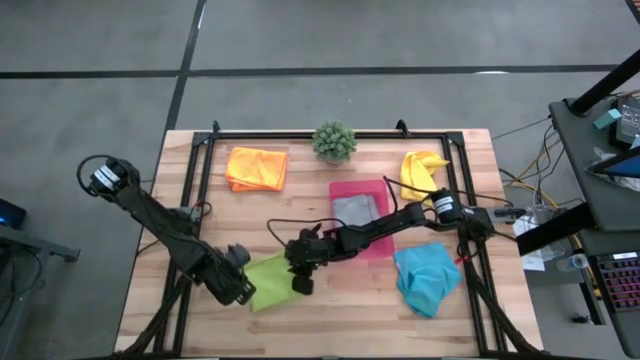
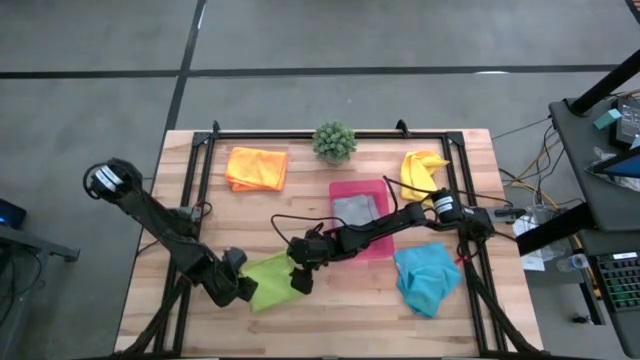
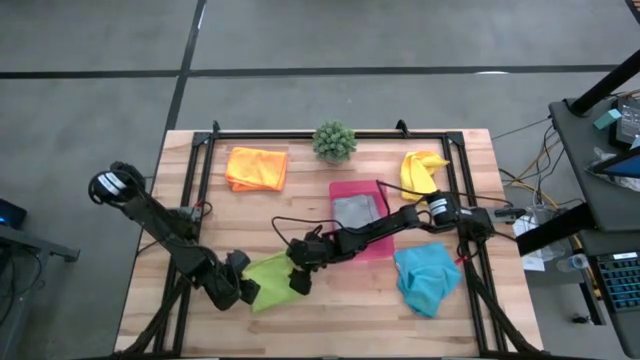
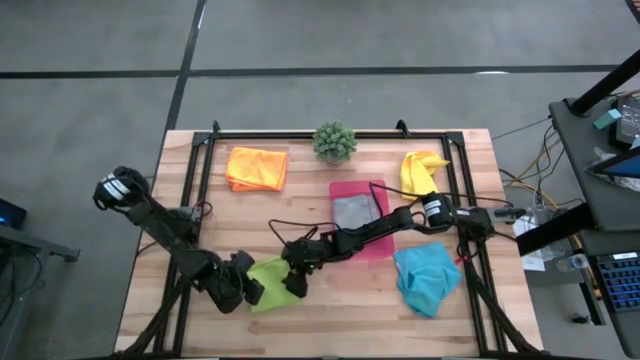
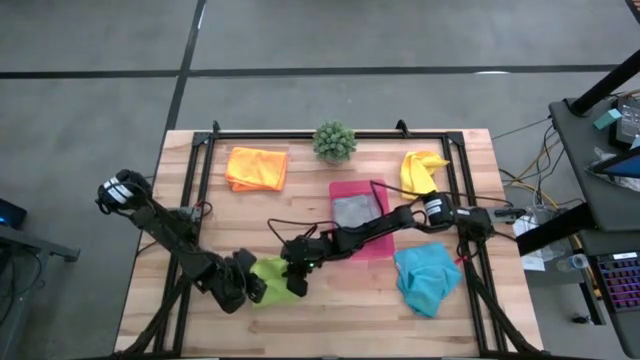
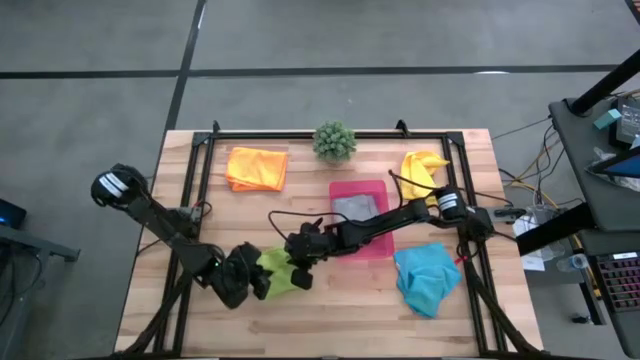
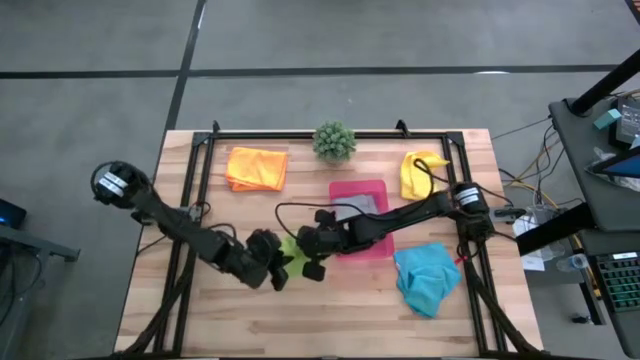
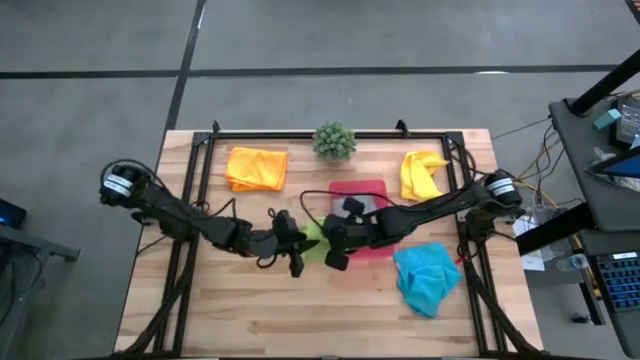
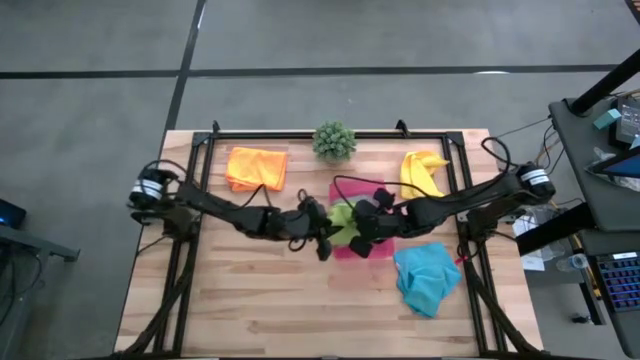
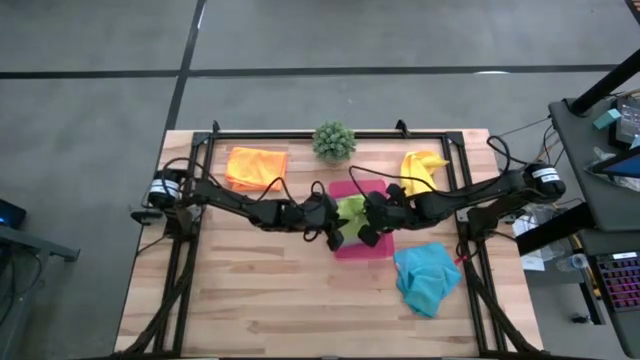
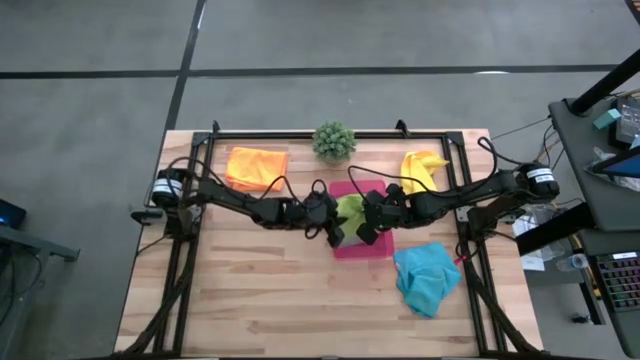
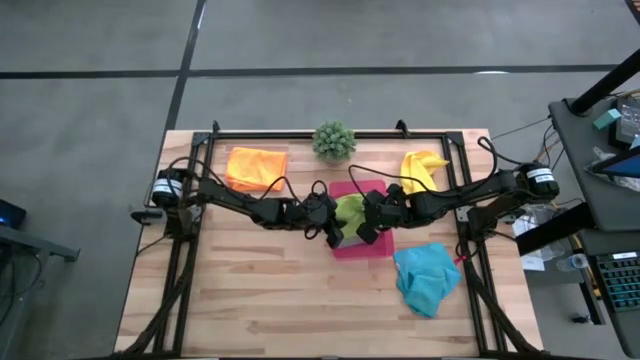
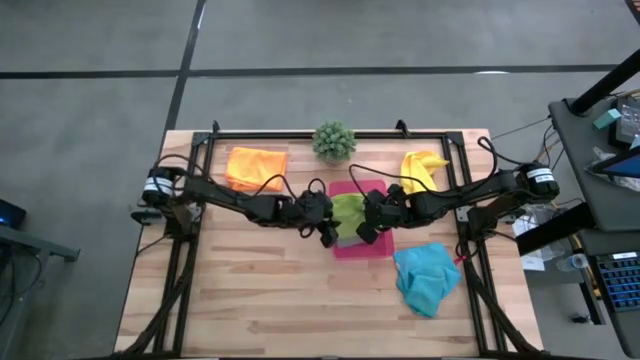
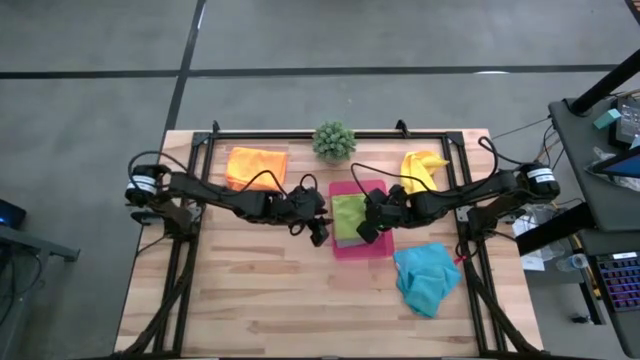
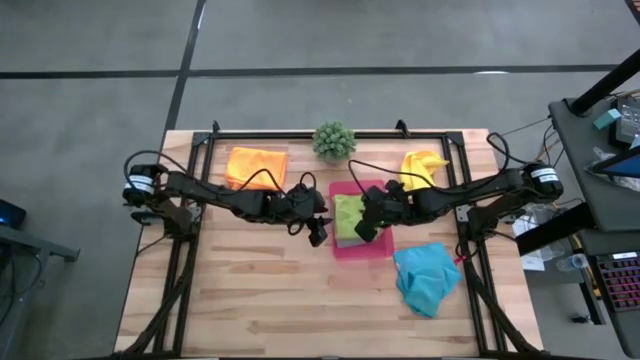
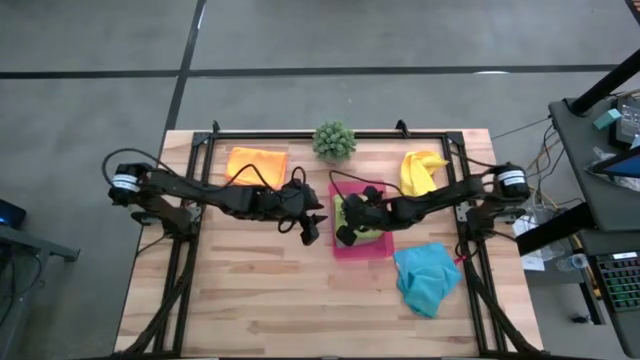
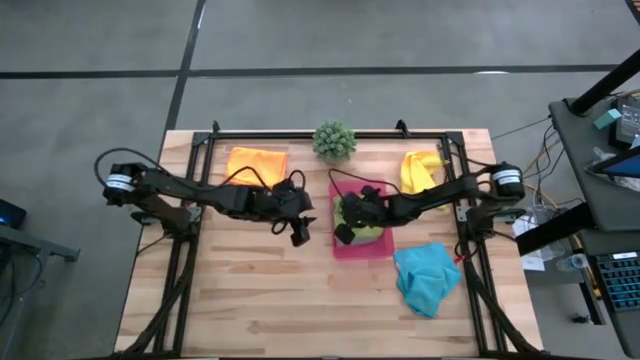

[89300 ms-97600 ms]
Task: Fold microfiber towels
Put the green towel into the red bin

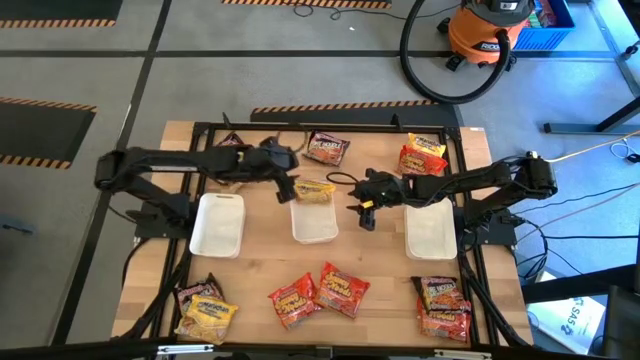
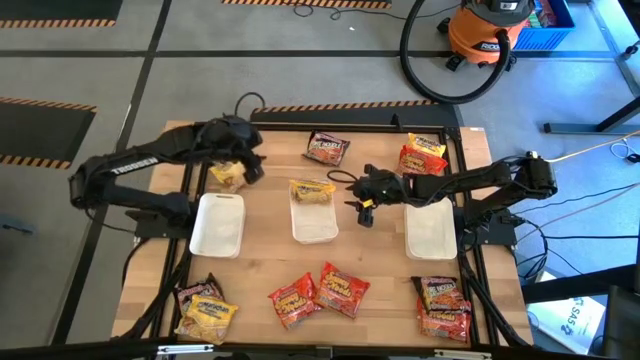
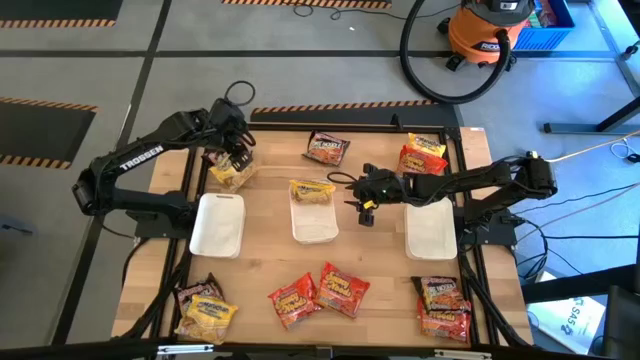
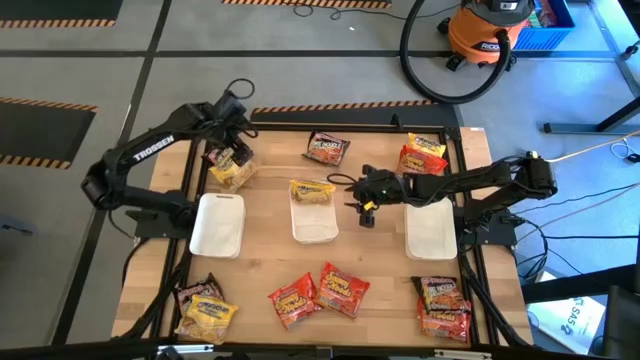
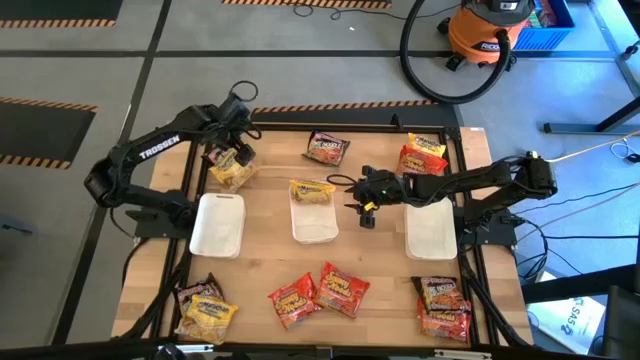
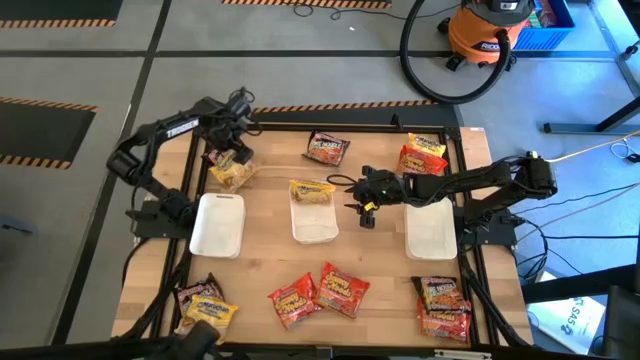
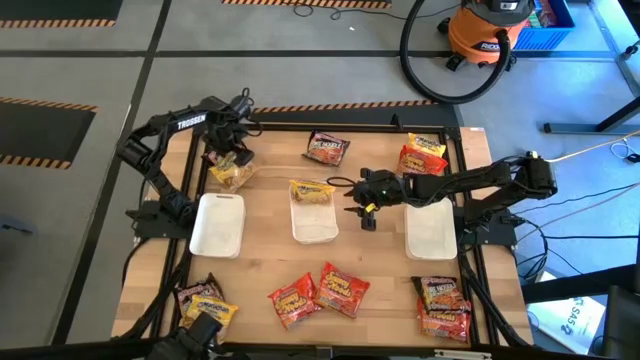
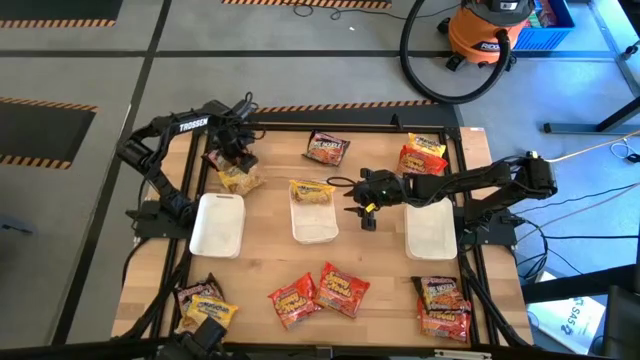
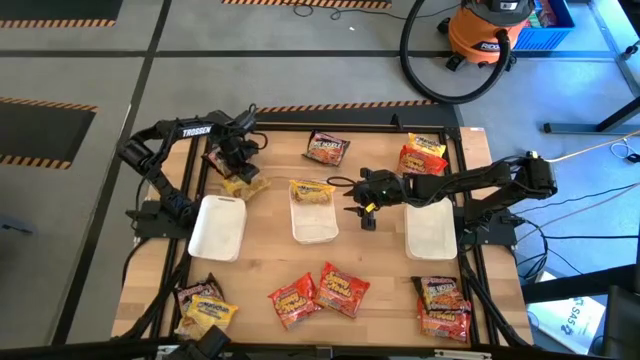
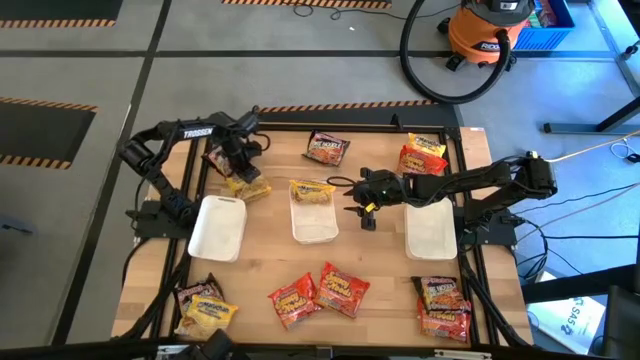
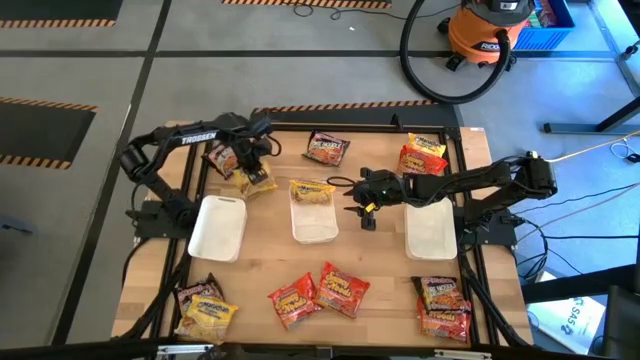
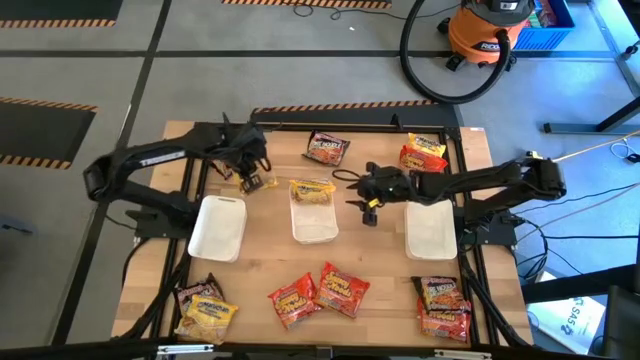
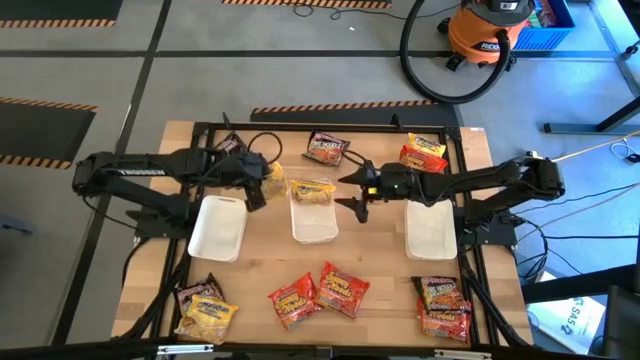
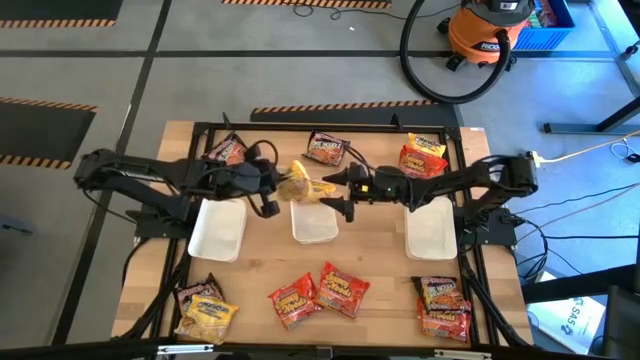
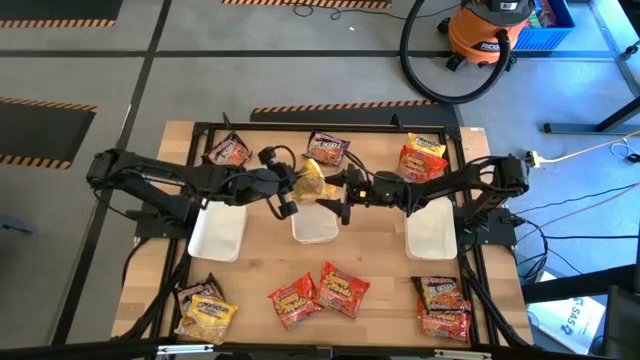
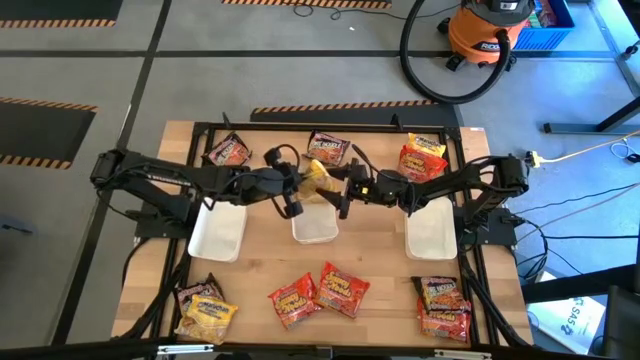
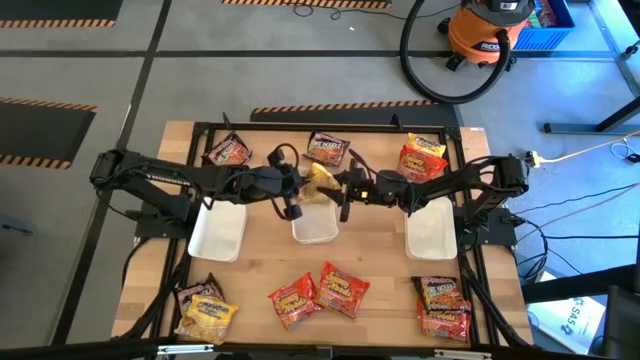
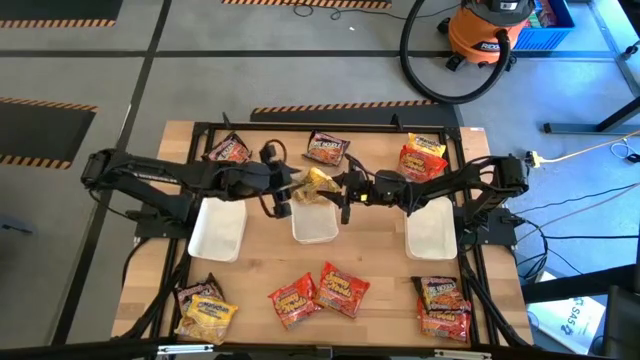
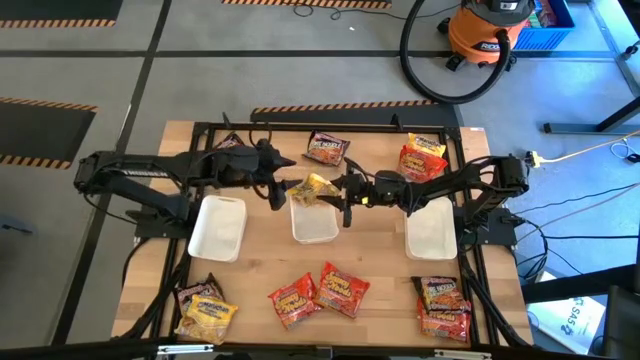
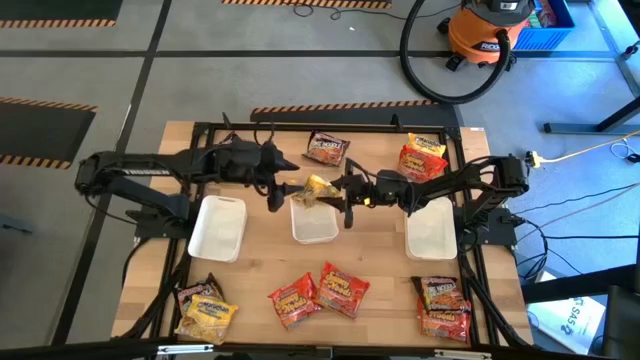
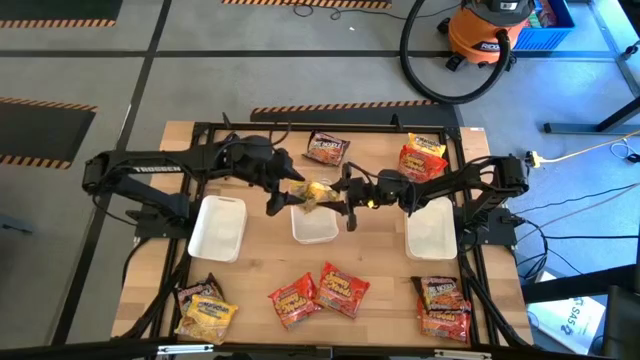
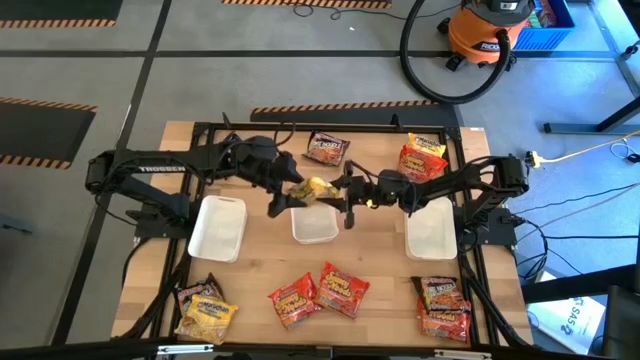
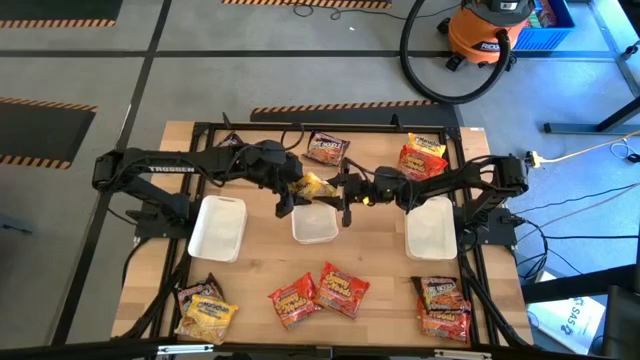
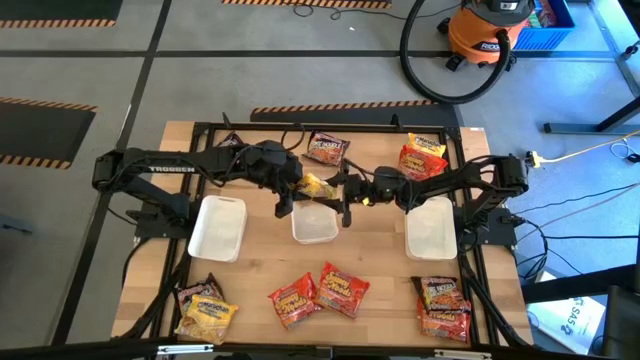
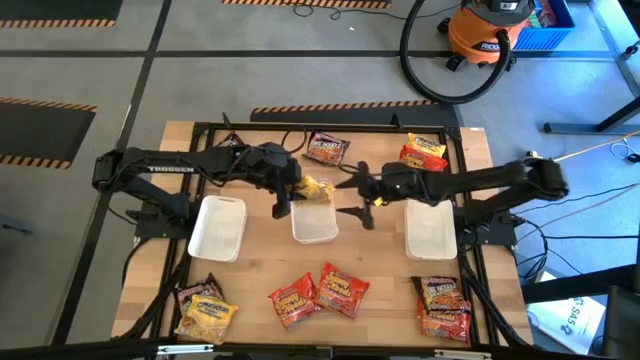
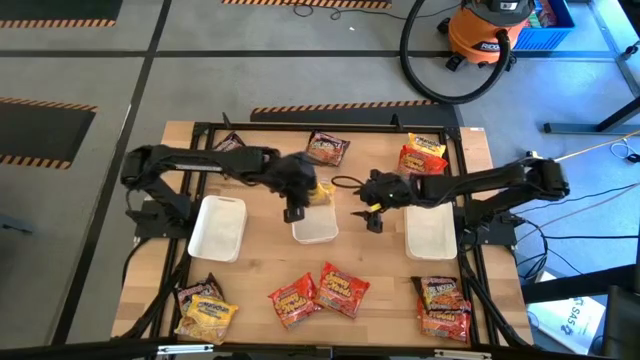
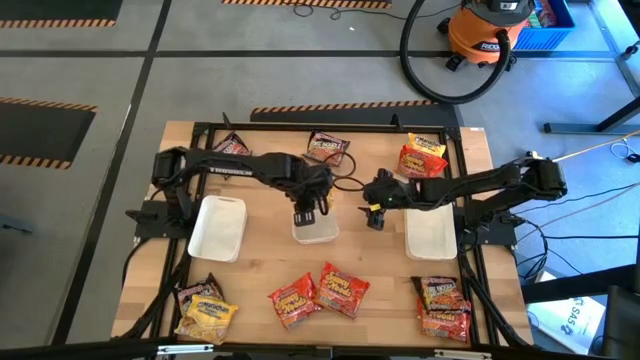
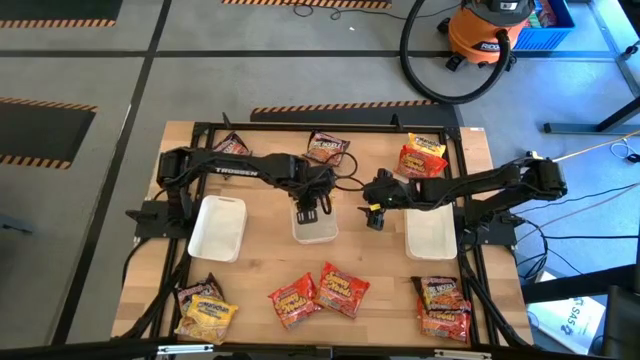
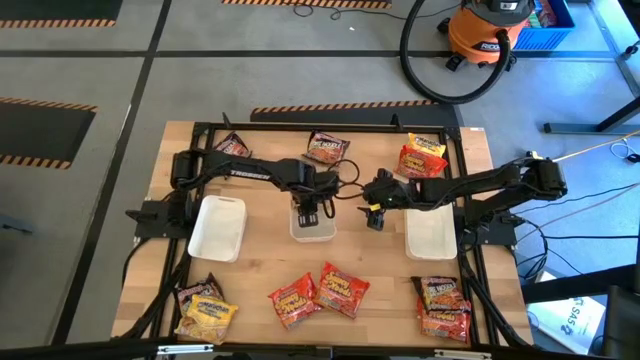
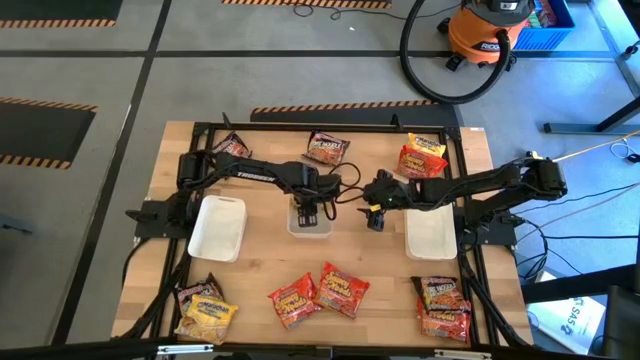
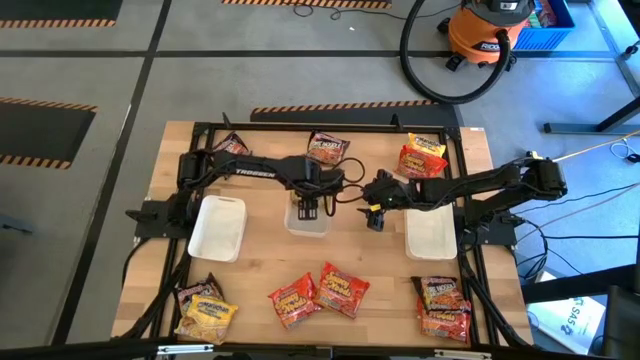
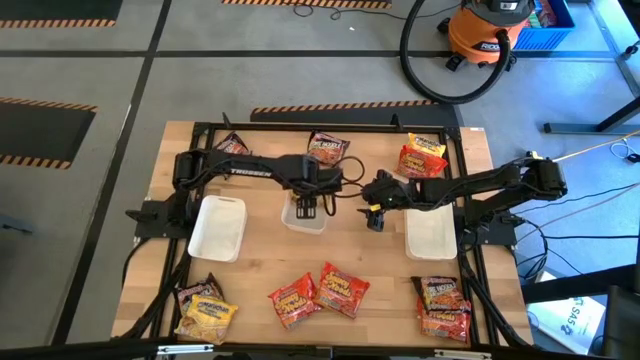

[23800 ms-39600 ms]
Task: Sort Maruchan noodles
Put the top left yellow noodle pack into the center white bin
